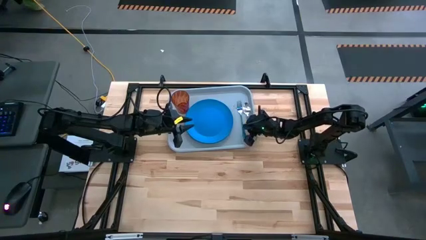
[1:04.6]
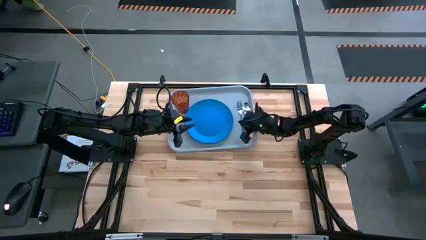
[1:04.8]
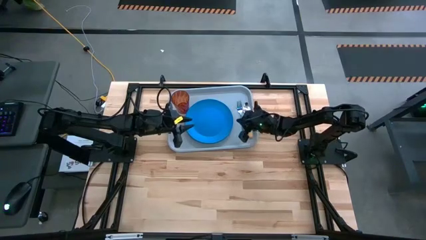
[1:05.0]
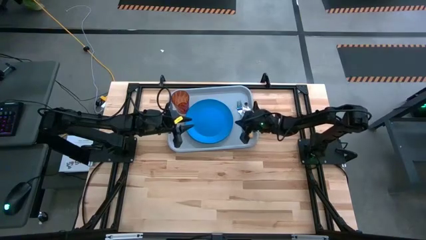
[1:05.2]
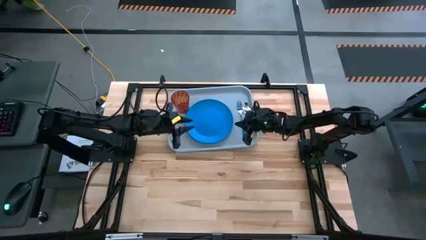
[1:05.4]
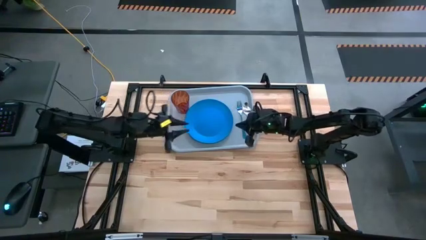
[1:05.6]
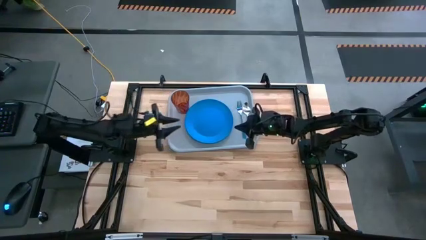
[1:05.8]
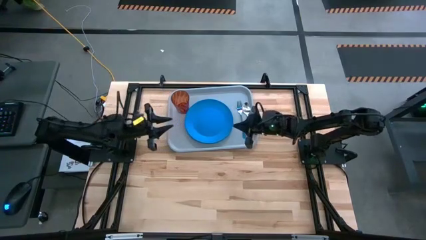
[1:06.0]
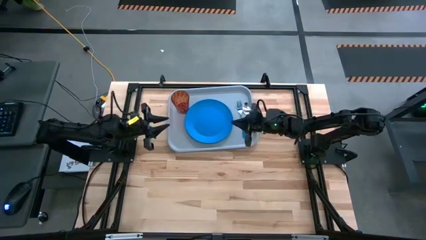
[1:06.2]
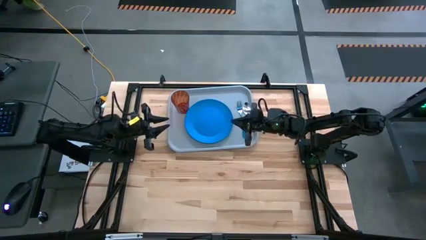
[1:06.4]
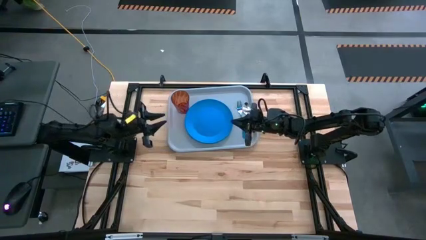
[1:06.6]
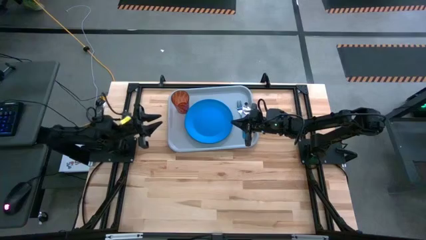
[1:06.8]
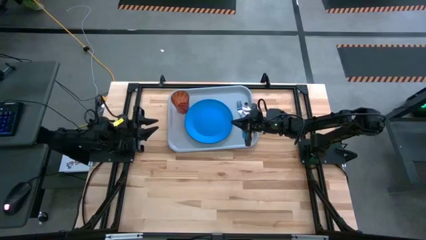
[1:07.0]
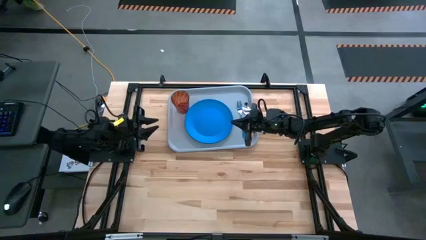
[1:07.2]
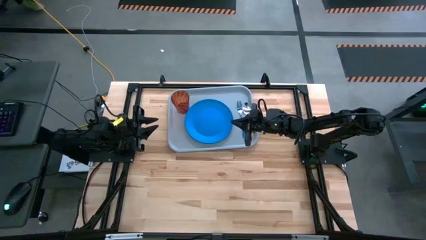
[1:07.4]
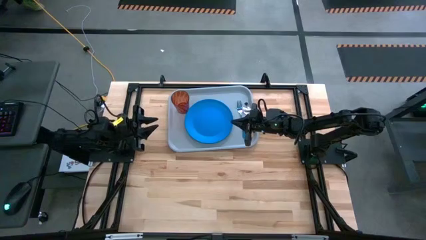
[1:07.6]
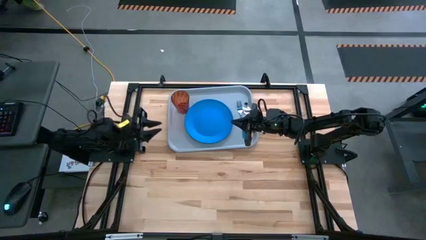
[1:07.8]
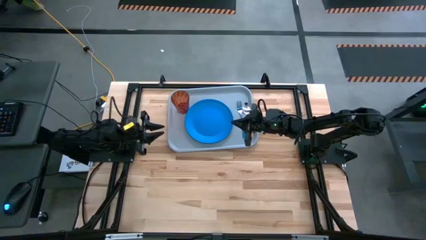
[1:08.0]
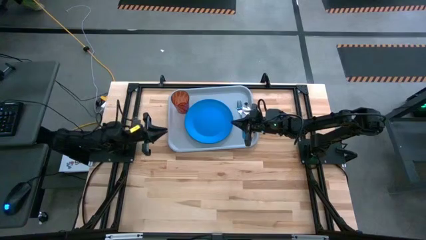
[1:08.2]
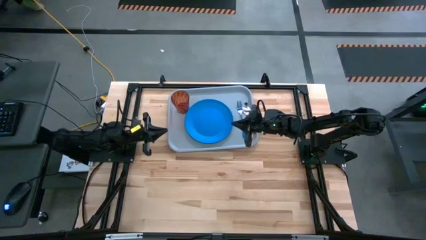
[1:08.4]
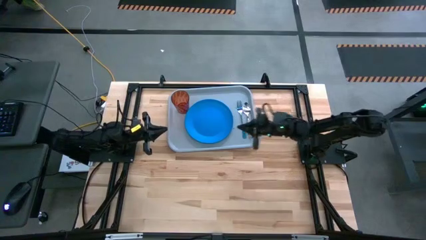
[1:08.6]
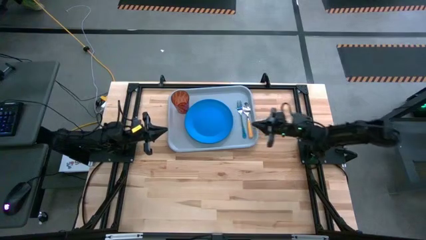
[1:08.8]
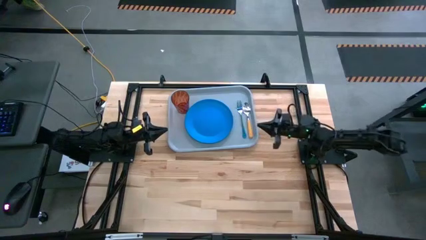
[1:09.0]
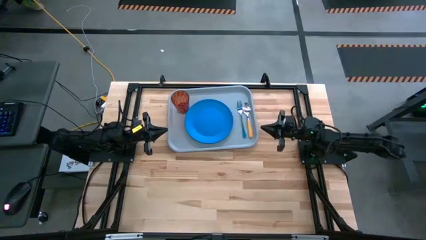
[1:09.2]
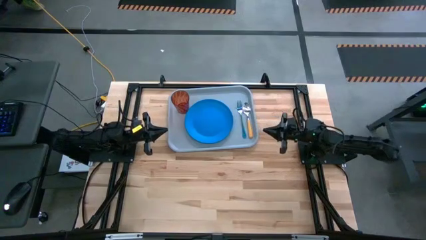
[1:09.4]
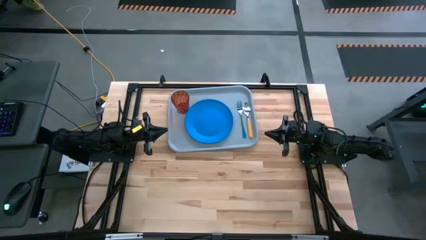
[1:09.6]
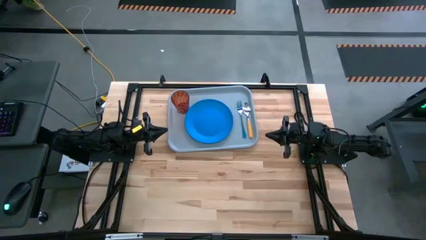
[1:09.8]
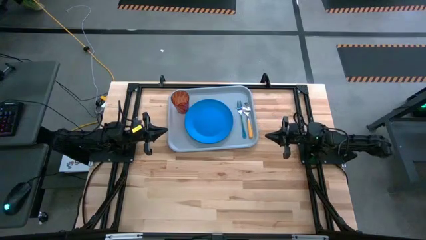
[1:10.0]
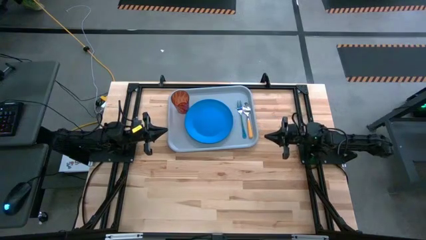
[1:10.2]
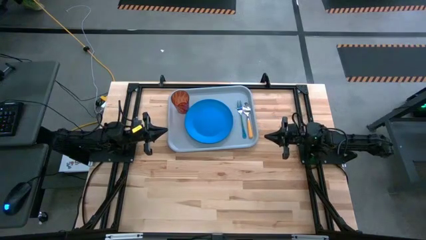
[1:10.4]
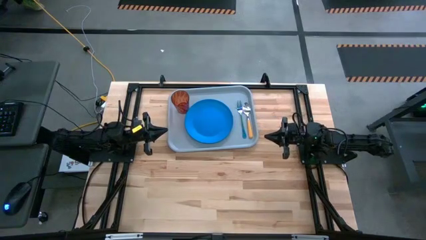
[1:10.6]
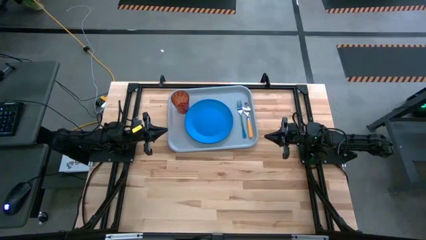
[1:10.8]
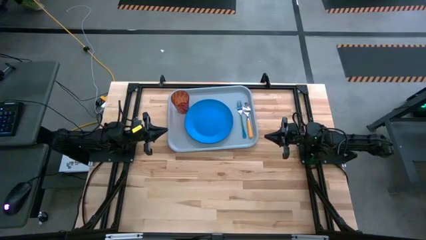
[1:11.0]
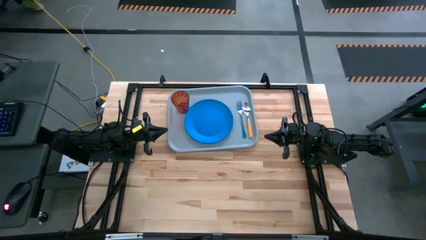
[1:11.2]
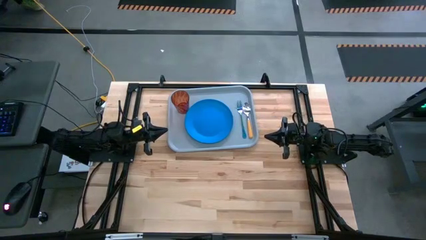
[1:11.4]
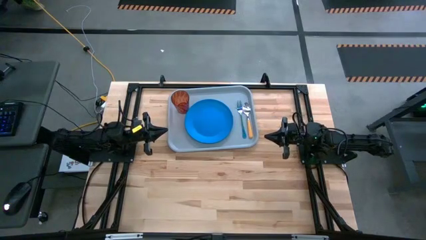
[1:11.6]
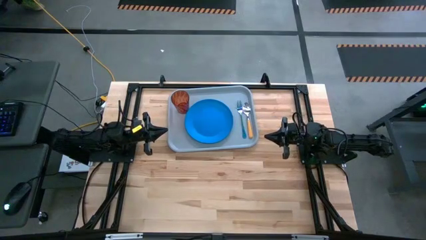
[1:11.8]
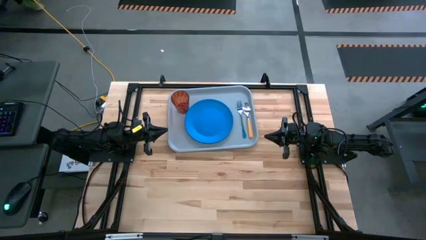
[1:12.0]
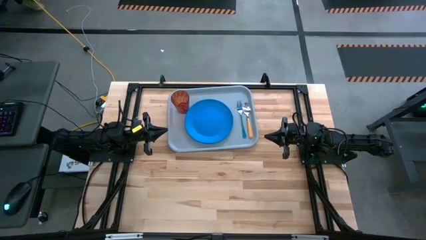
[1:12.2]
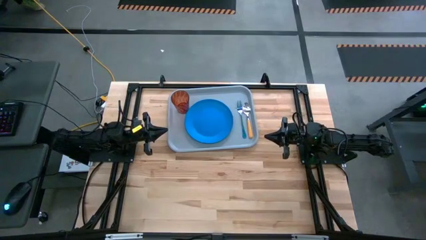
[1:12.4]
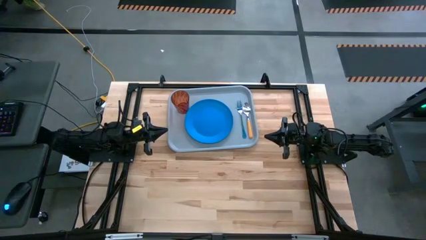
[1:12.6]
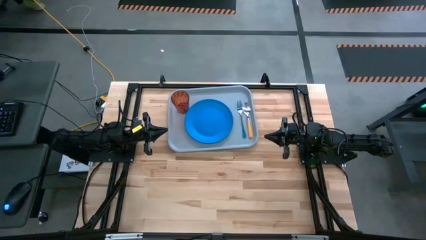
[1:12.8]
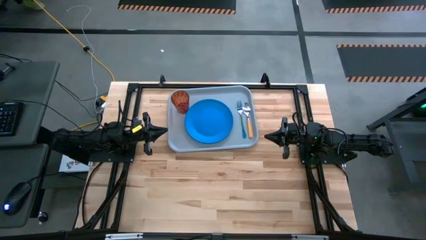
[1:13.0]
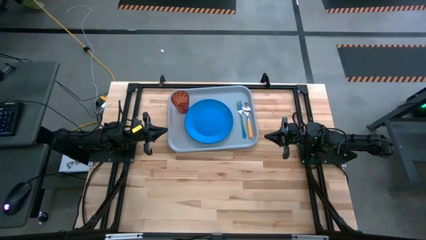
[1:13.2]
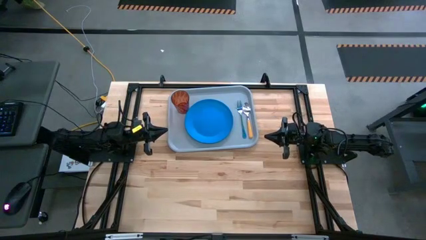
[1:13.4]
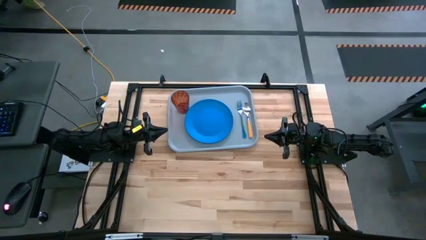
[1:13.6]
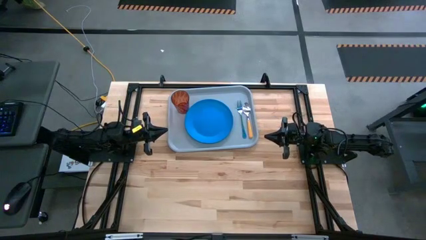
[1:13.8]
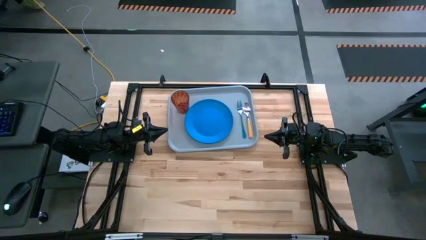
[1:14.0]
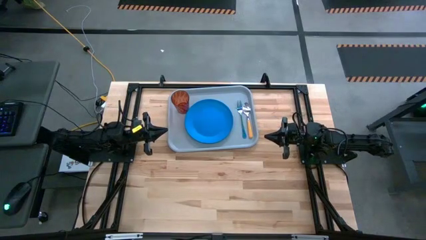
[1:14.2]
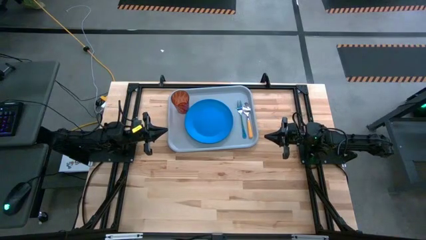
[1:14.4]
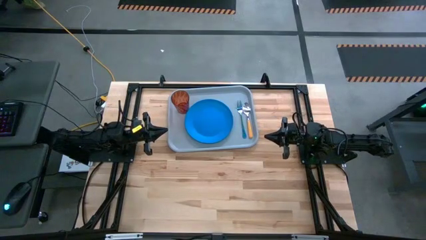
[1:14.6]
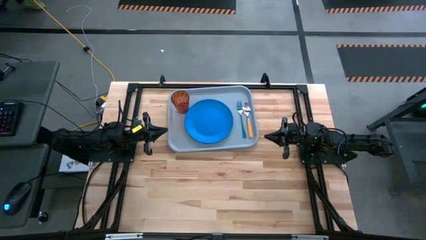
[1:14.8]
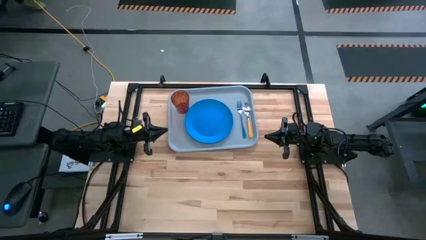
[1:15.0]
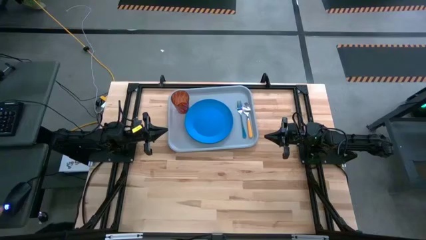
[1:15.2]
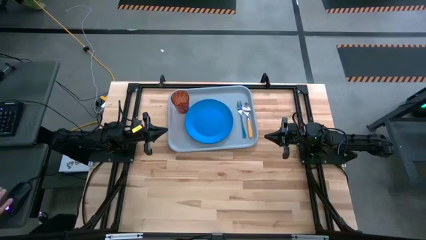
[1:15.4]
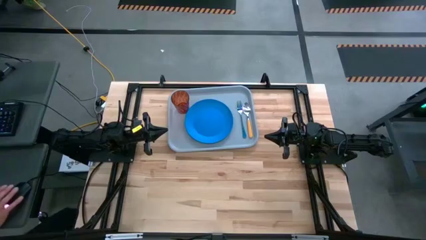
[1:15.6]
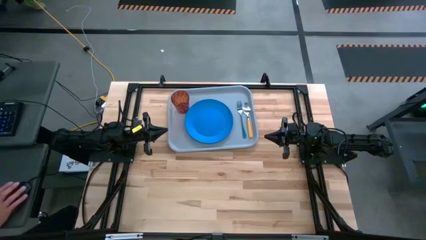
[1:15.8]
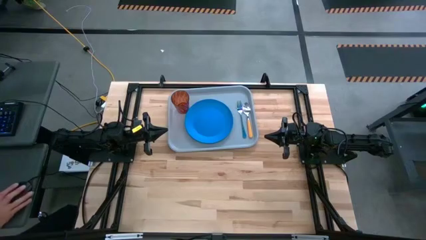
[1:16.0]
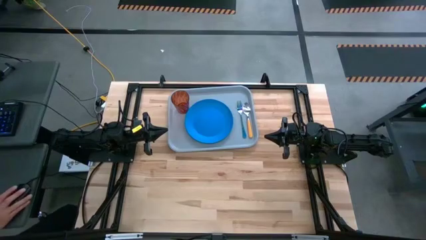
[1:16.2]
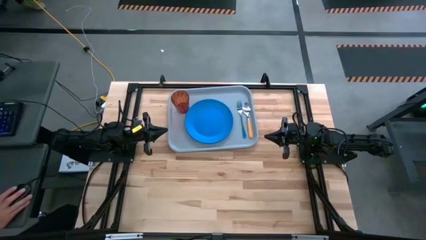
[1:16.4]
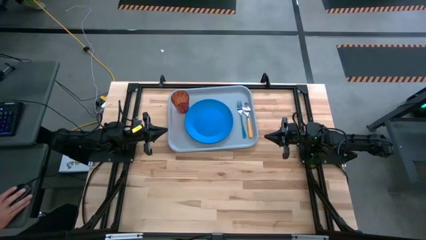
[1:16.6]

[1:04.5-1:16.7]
Task: Pick and place plate/cup/fork/spoon on tray
Return to Home Position

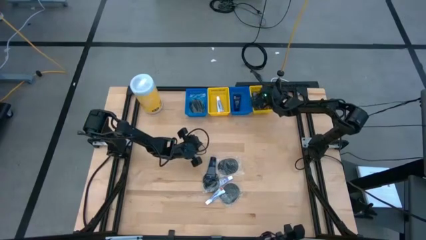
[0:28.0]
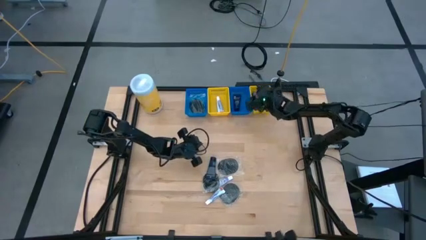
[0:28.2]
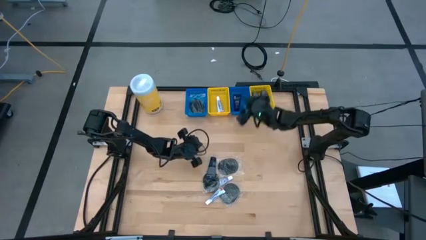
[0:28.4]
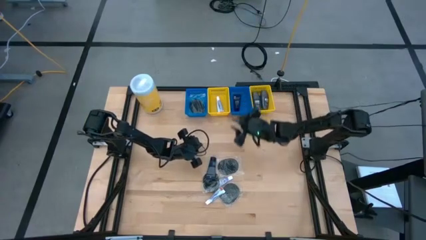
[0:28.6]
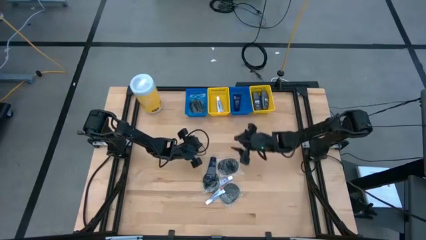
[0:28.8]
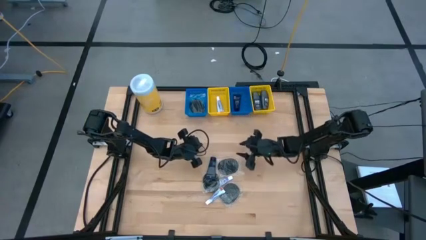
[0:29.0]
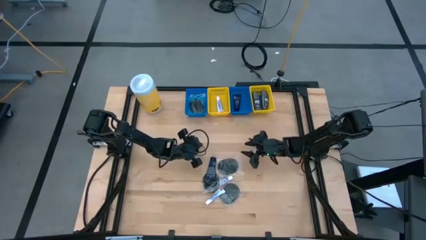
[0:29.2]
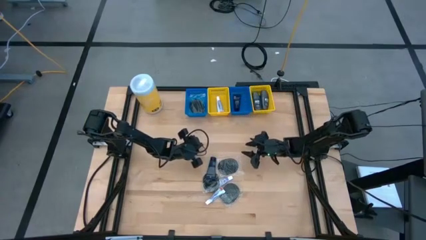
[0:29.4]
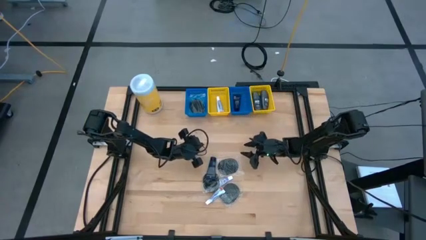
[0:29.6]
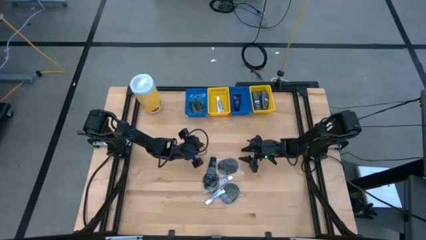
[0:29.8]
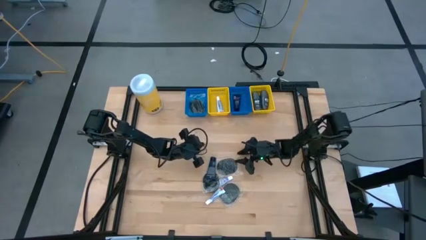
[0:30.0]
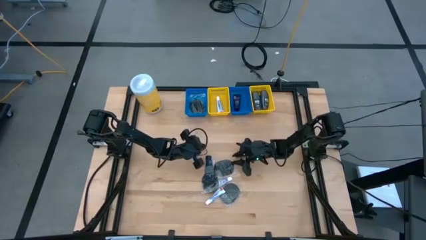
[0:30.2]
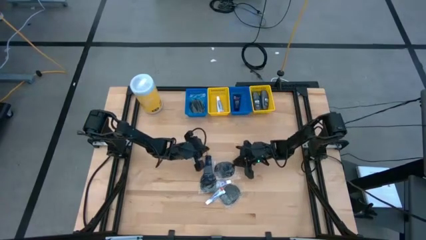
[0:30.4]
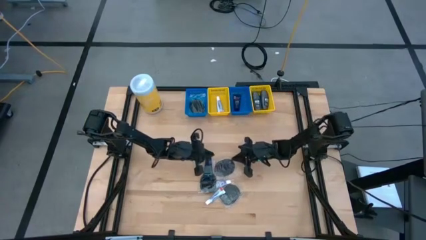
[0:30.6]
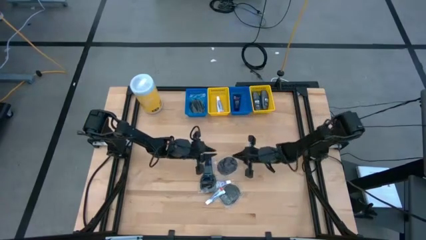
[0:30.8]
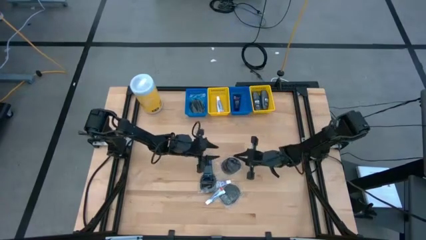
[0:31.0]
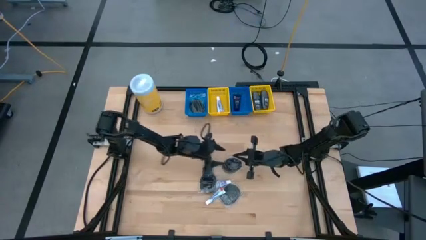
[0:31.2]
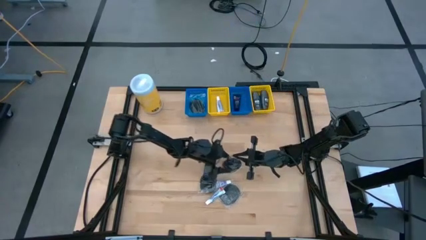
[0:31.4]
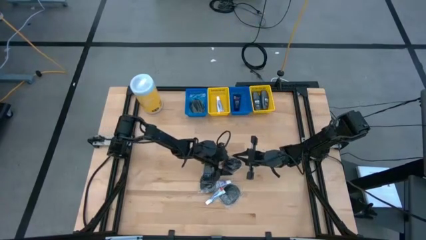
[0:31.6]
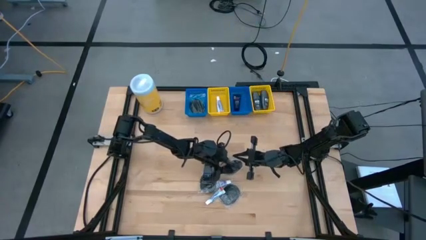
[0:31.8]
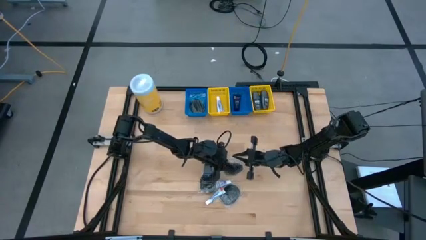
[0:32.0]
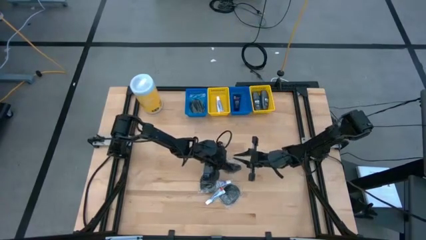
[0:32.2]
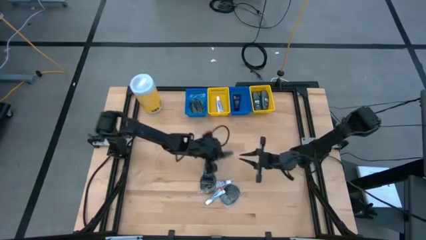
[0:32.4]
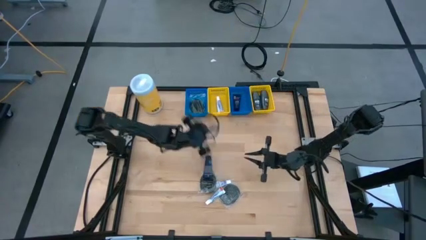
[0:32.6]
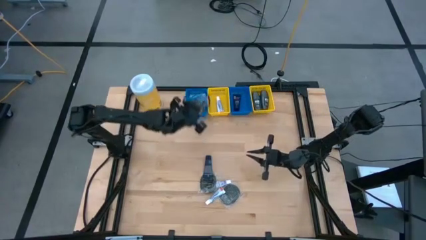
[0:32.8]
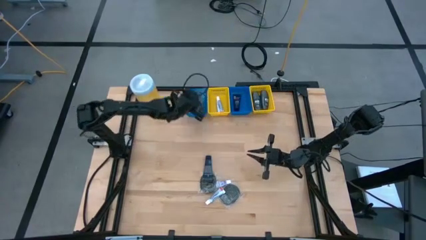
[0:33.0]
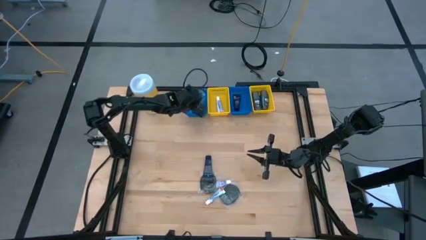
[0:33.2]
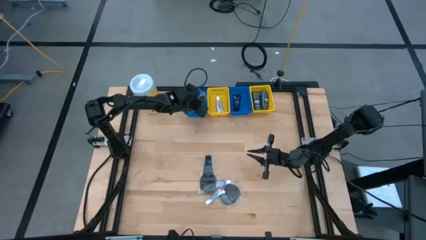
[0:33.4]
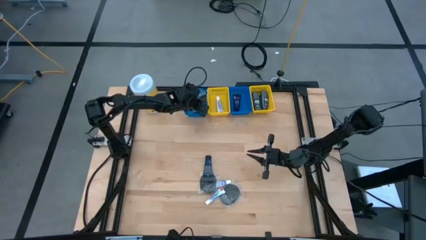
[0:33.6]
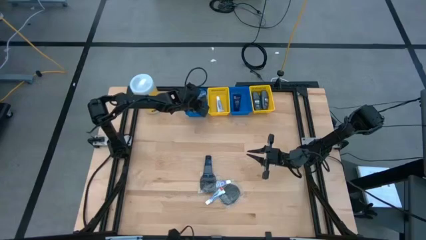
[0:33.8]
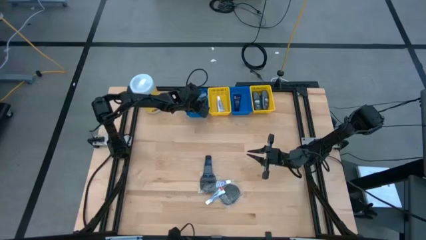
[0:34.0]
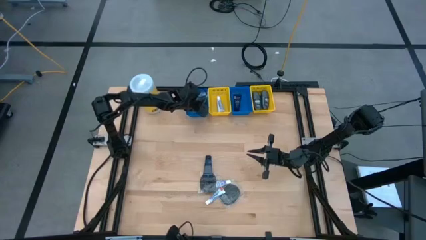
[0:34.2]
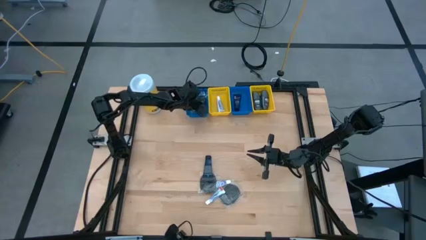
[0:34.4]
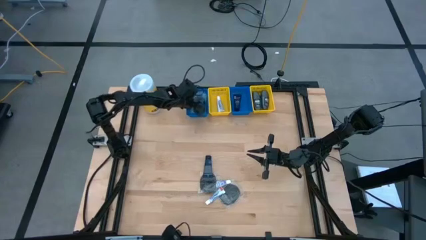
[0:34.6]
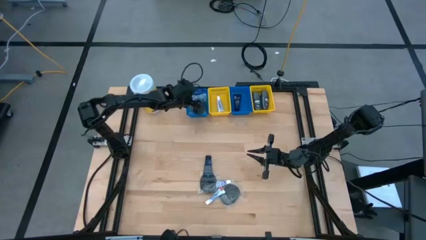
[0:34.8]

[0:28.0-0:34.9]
Task: Pick & Place Travel size toiletries
Put the black comb into the left blue bin
